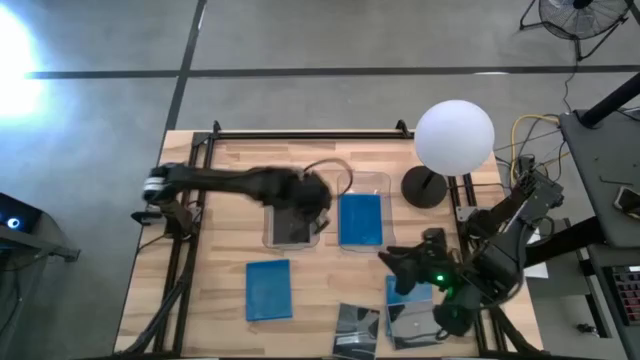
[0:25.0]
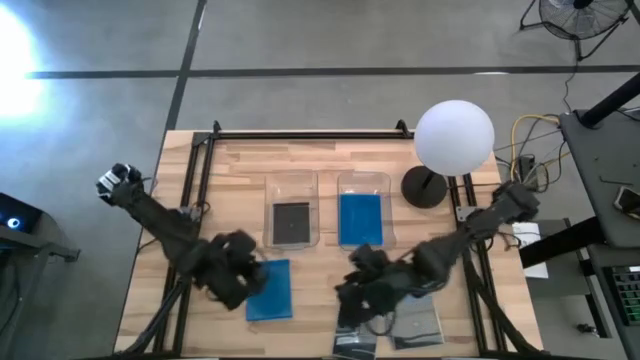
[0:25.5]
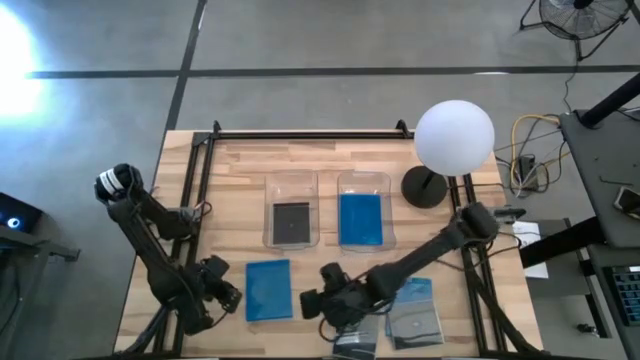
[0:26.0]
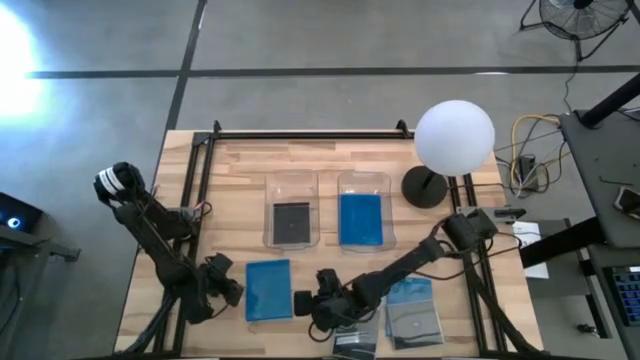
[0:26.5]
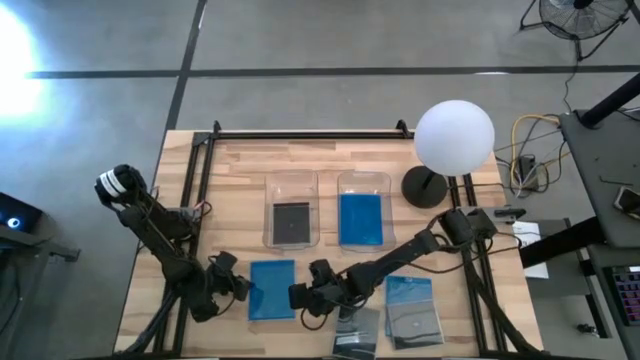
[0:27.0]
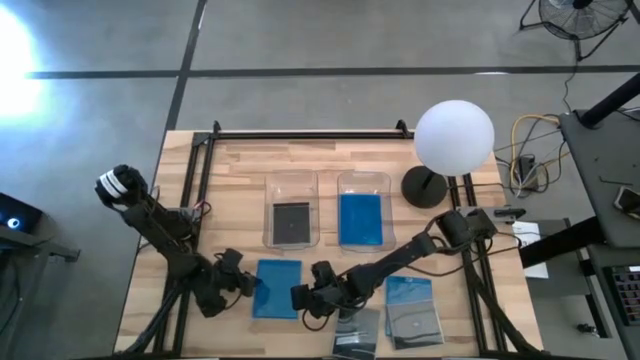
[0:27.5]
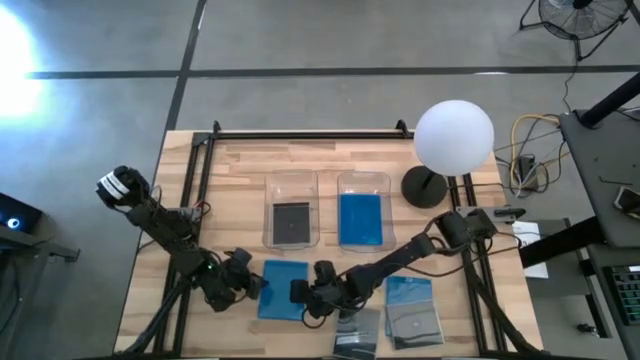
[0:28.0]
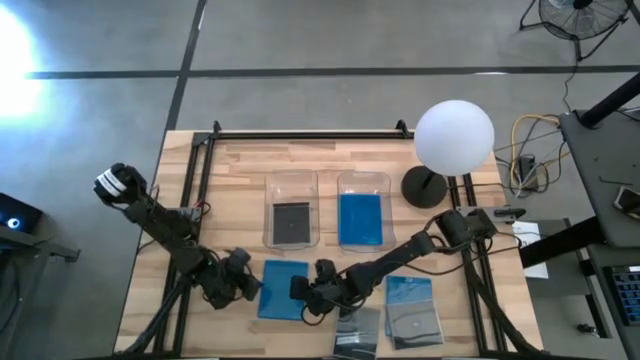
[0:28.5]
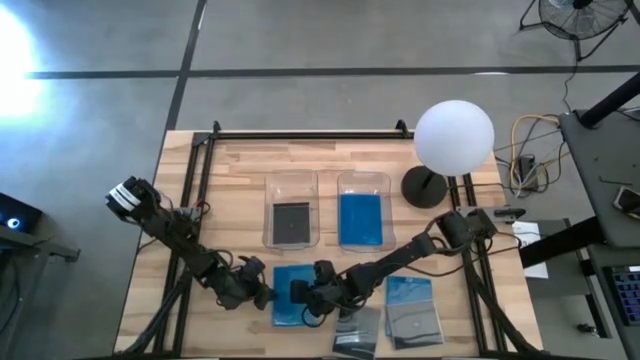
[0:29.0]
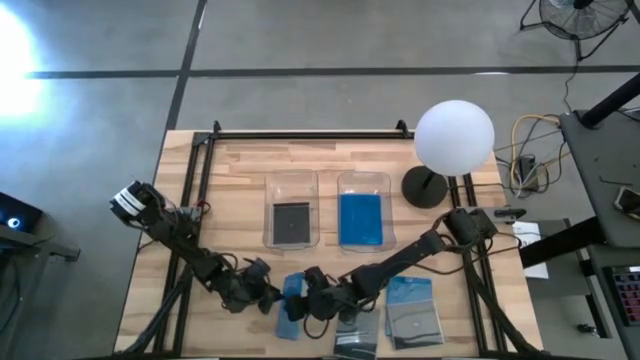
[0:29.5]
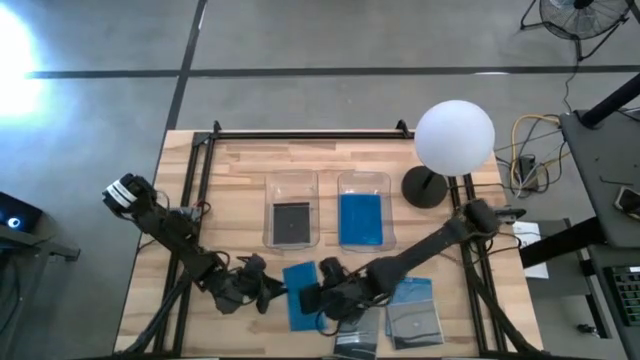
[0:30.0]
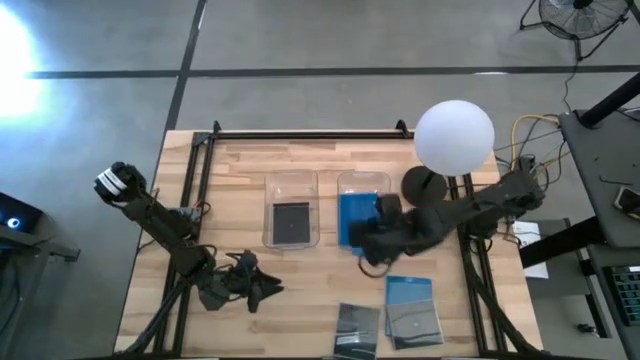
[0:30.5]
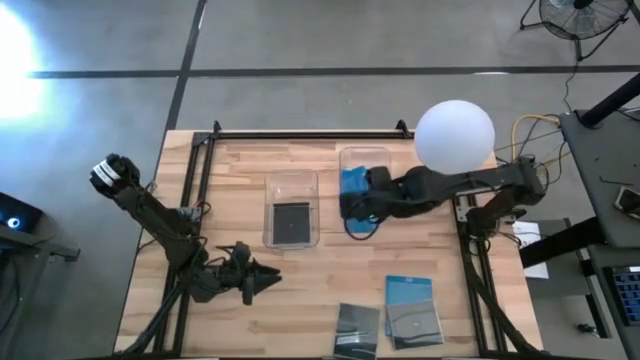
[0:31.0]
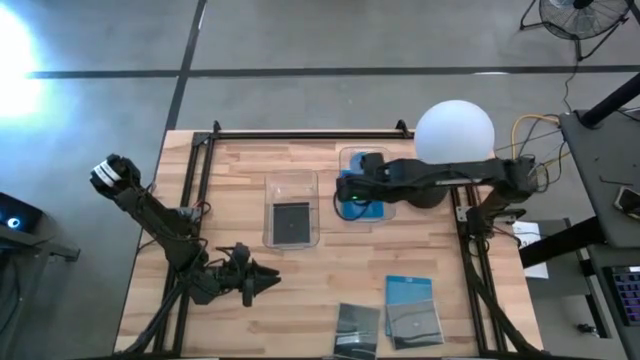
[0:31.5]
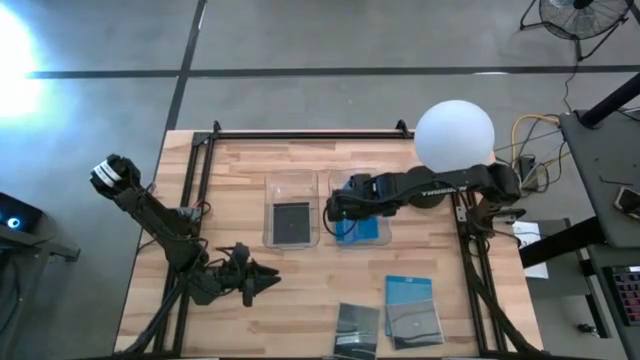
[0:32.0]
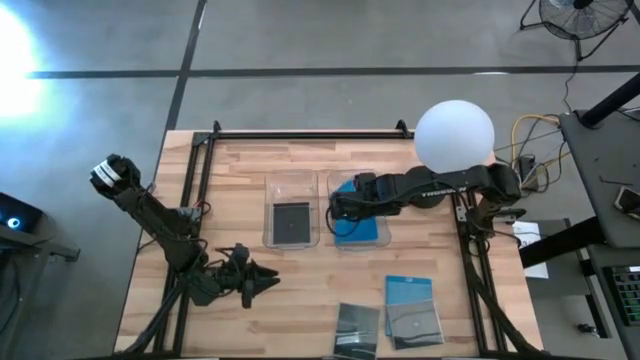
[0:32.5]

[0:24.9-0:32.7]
Task: Pick & place jewel cases by type
Put the left blue cd case into the right transparent bin

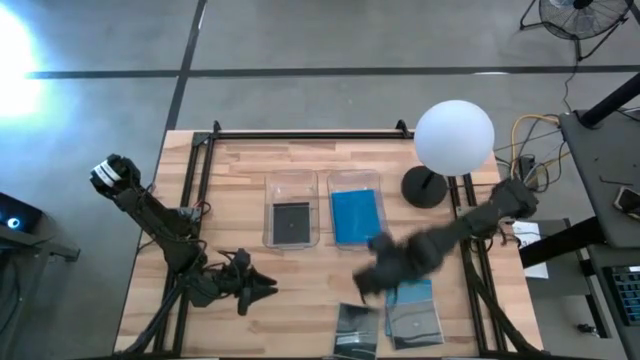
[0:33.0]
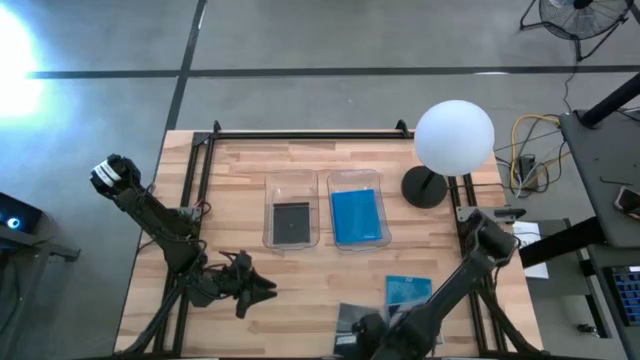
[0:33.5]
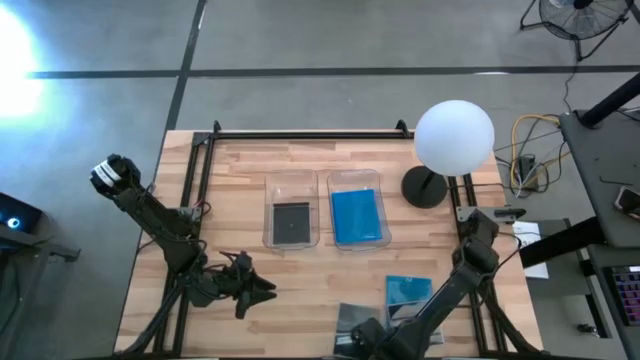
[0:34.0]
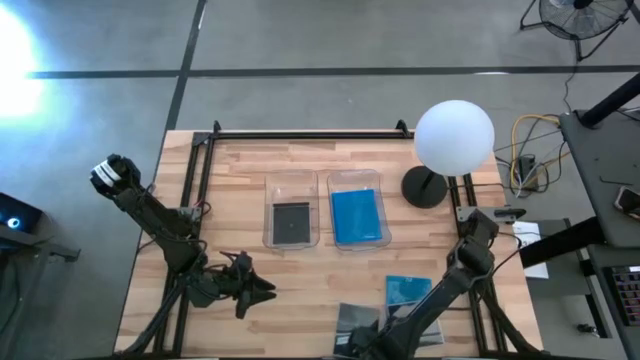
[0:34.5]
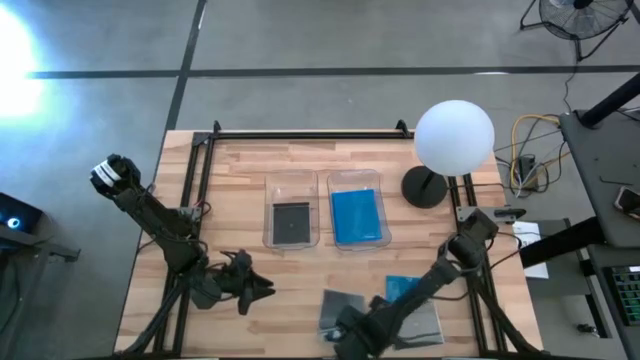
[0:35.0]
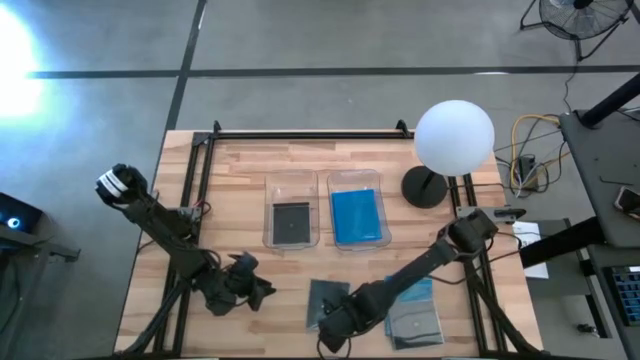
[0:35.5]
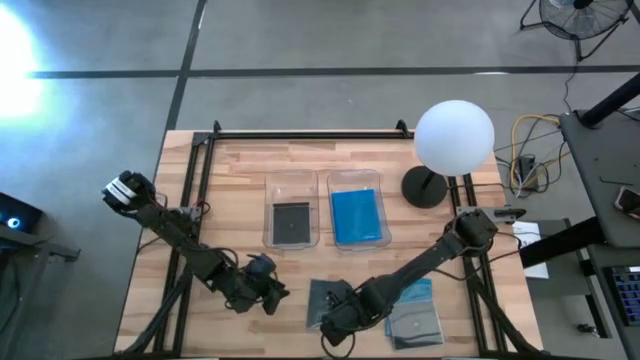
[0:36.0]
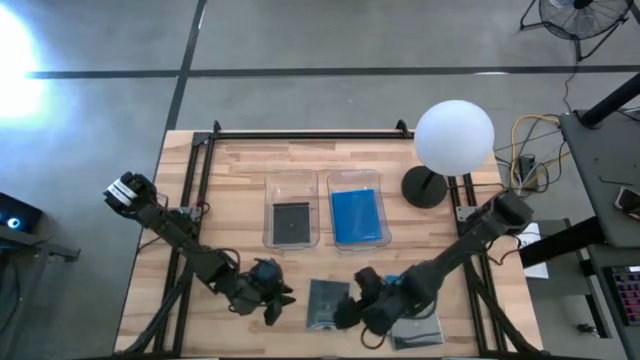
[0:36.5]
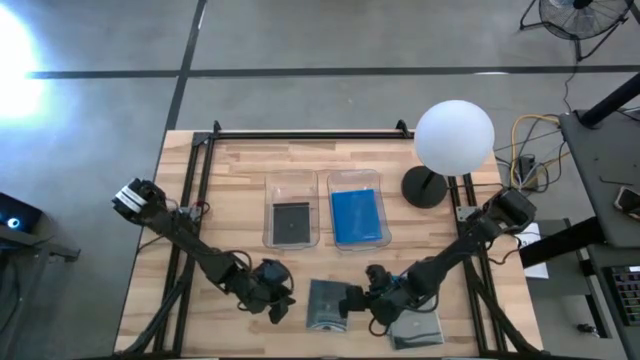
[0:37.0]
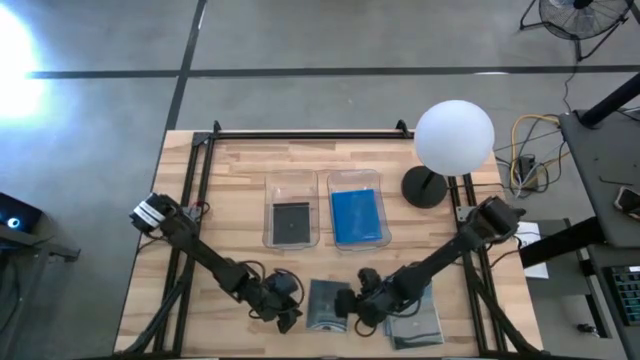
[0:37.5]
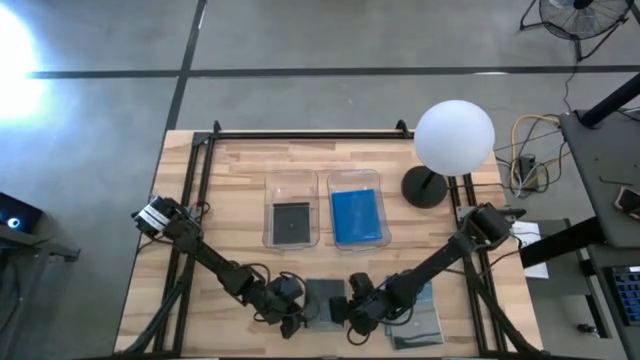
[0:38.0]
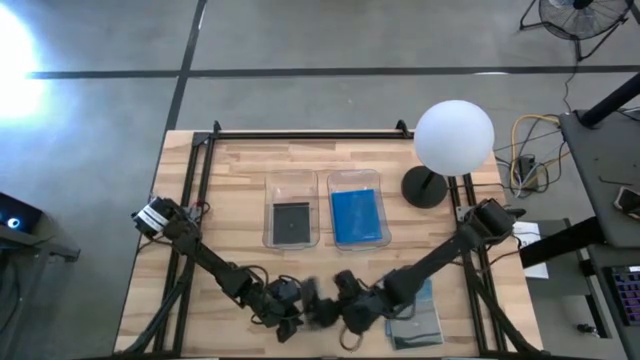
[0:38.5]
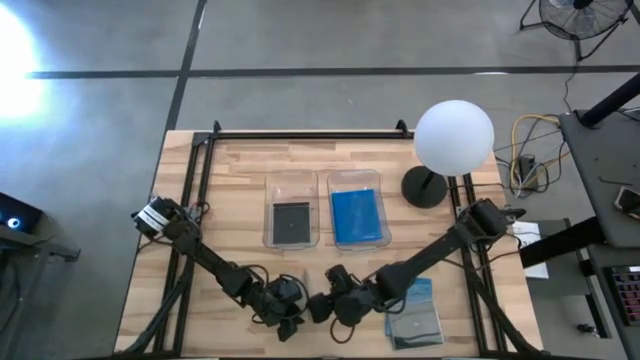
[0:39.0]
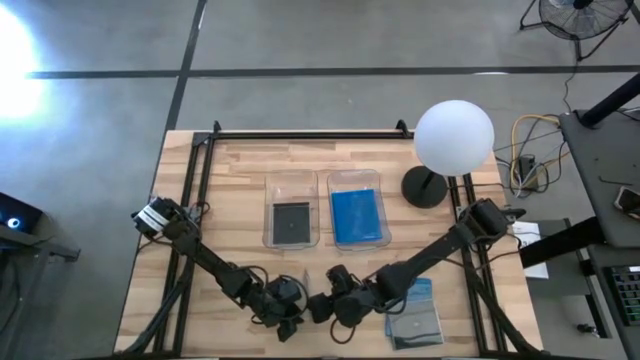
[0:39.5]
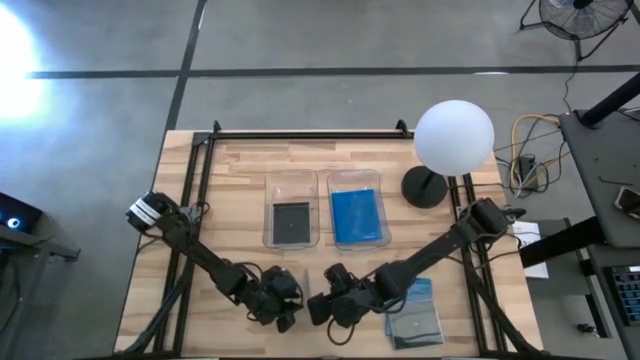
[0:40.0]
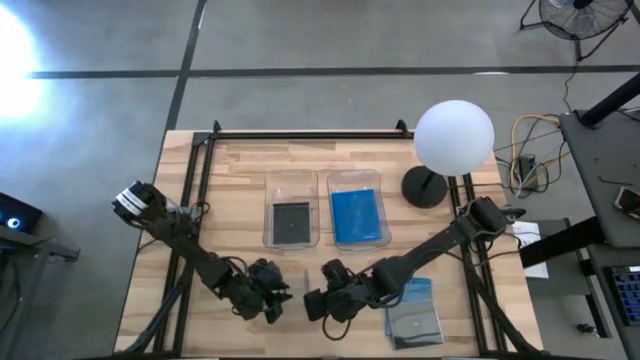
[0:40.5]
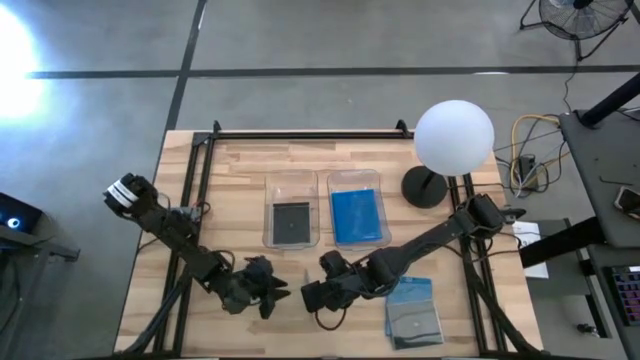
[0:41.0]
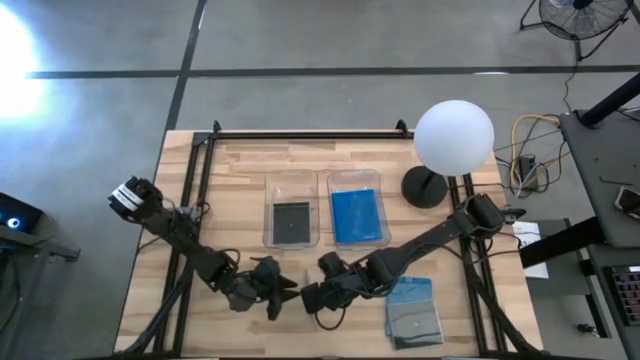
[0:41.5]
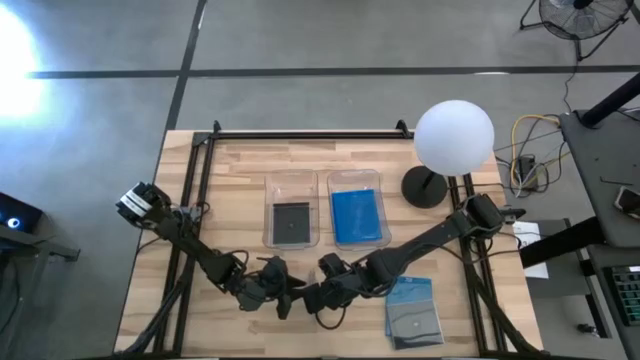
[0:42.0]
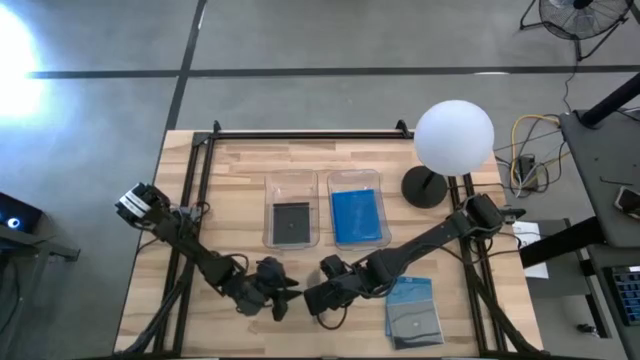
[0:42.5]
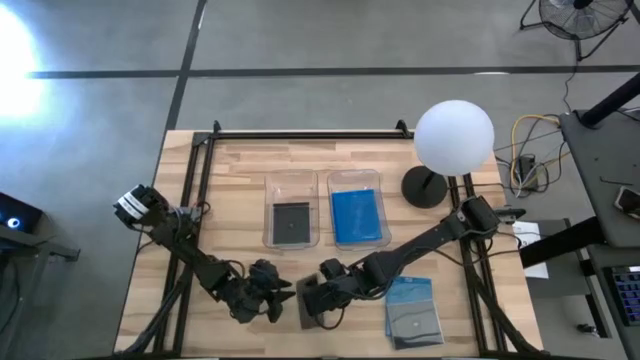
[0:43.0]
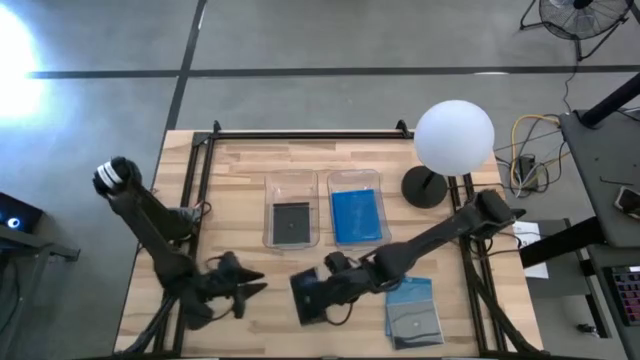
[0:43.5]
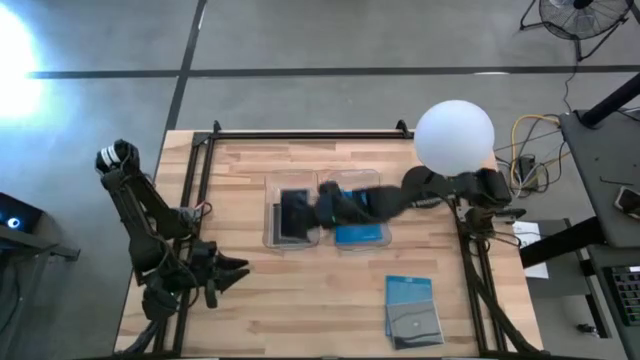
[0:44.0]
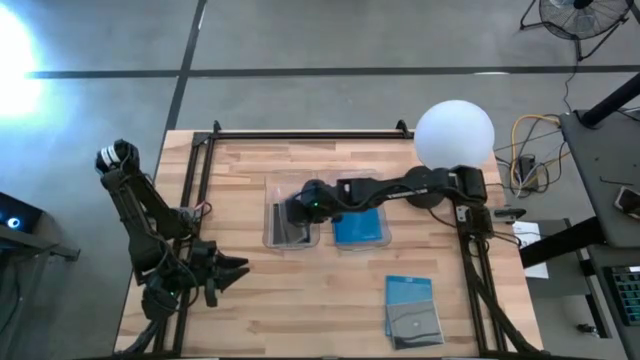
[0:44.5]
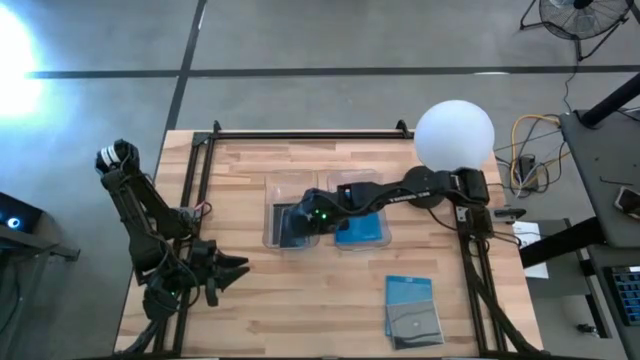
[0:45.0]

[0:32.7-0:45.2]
Put the left black cd case into the left transparent bin
